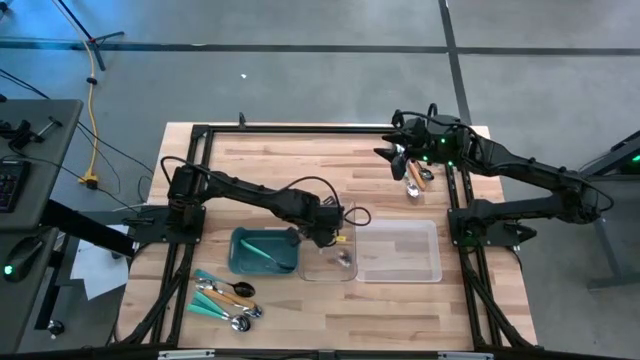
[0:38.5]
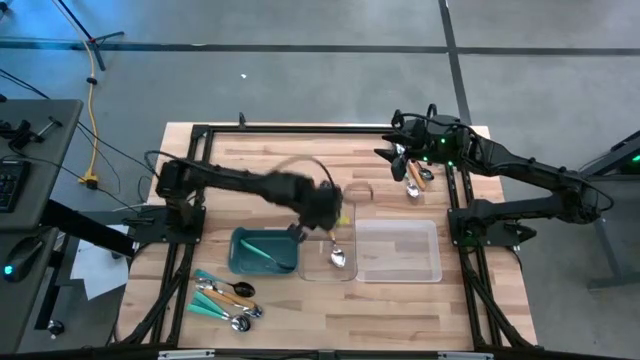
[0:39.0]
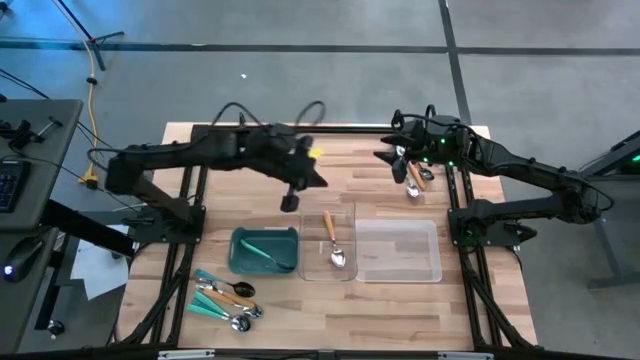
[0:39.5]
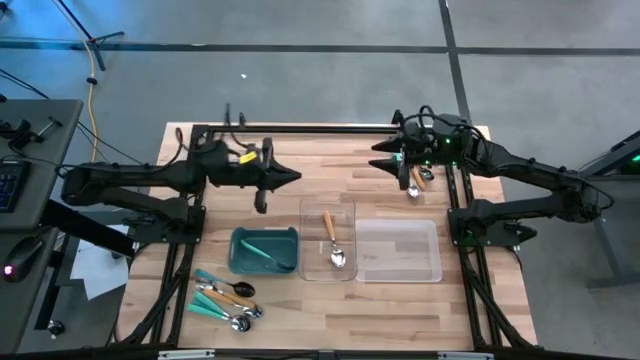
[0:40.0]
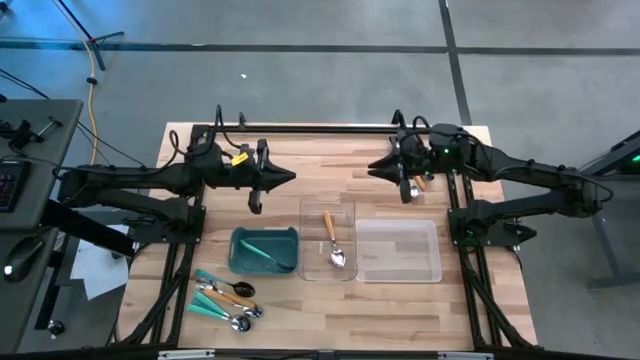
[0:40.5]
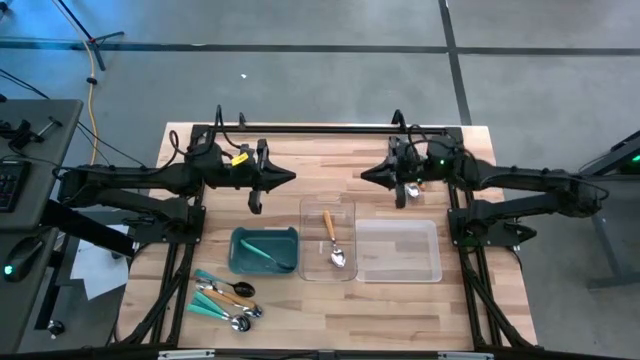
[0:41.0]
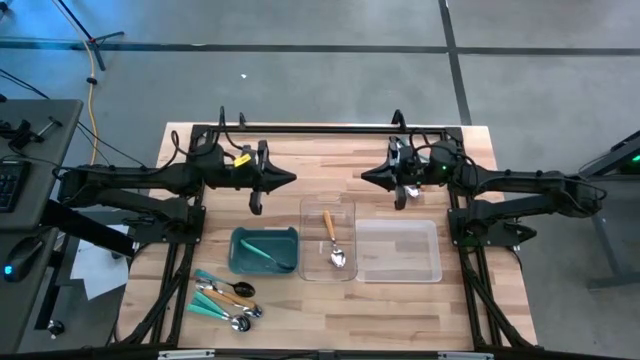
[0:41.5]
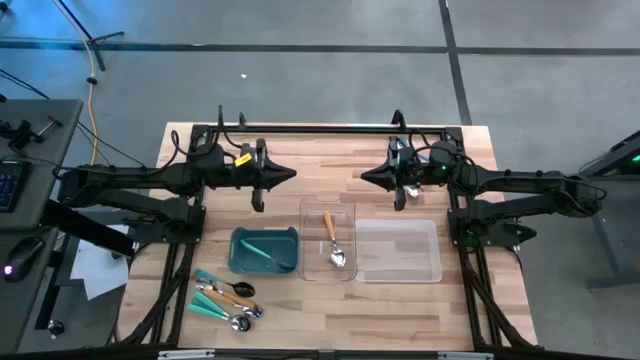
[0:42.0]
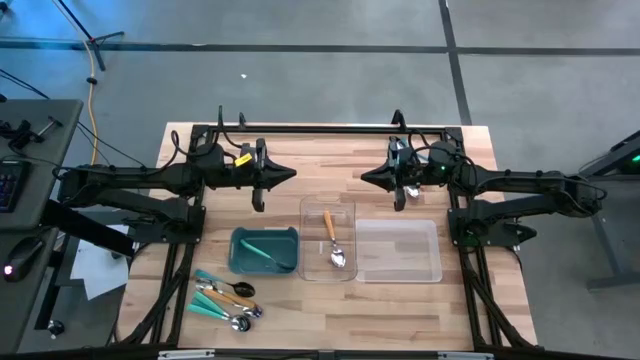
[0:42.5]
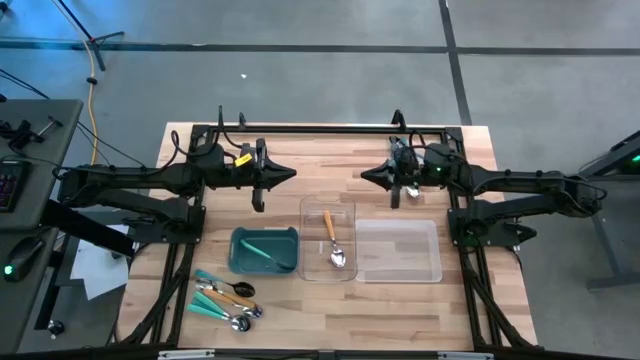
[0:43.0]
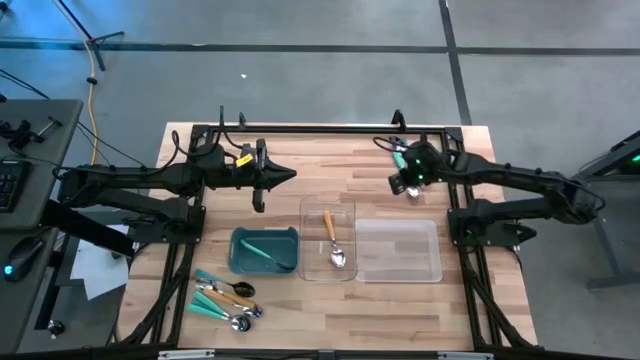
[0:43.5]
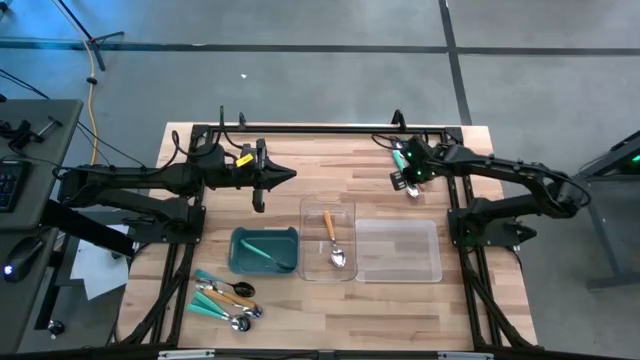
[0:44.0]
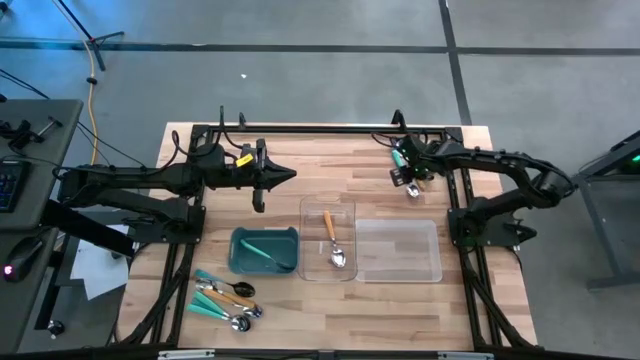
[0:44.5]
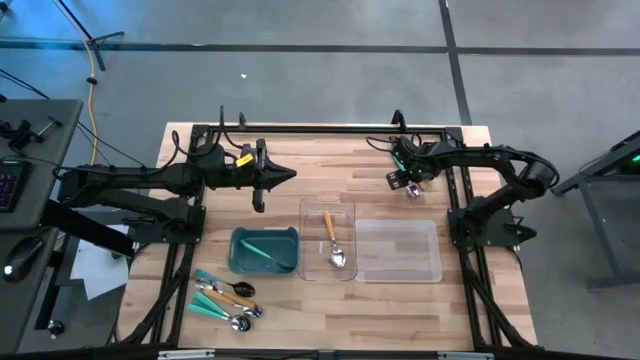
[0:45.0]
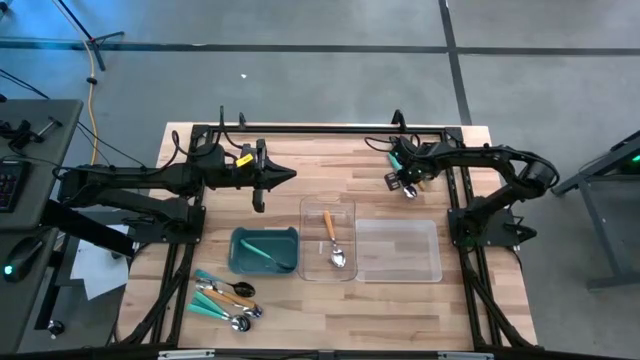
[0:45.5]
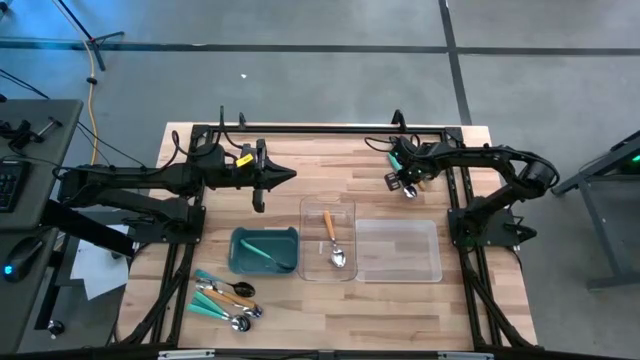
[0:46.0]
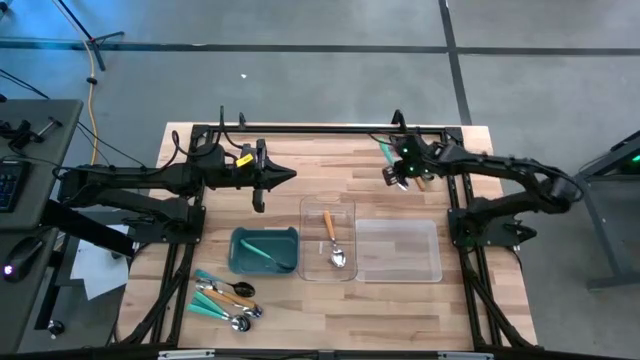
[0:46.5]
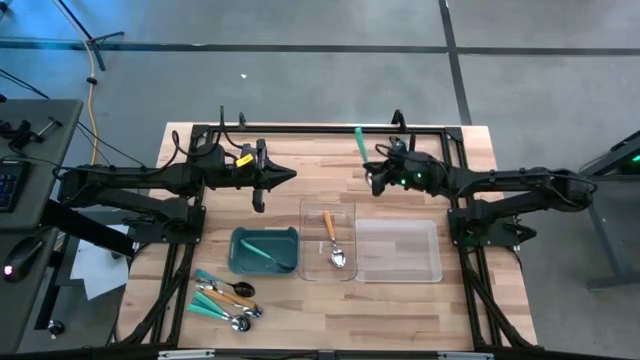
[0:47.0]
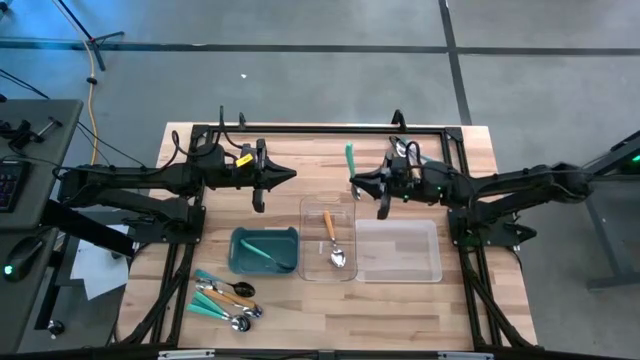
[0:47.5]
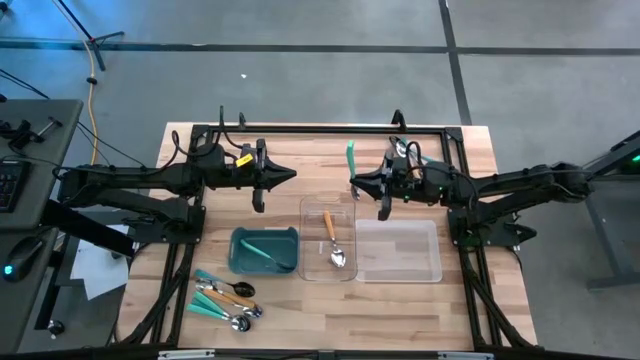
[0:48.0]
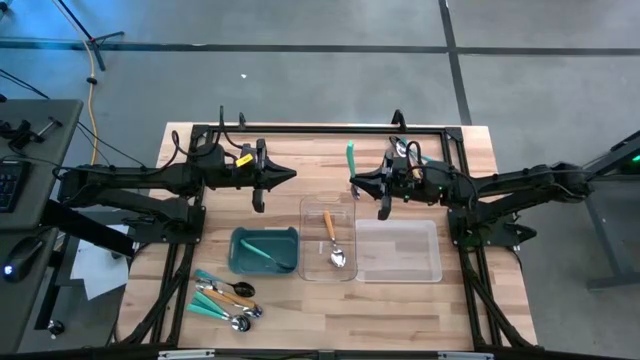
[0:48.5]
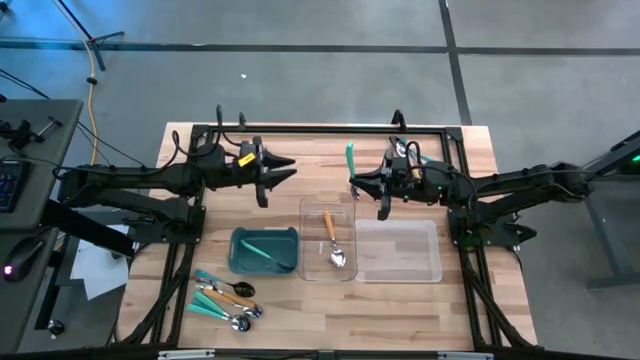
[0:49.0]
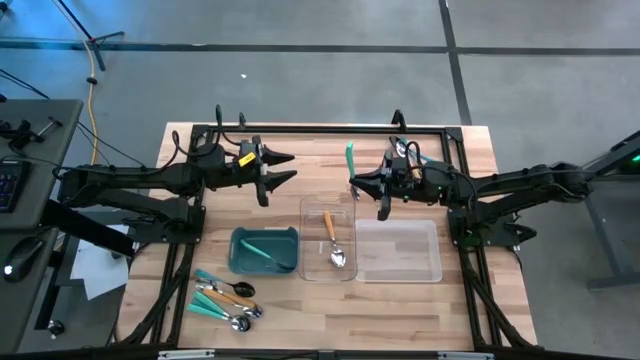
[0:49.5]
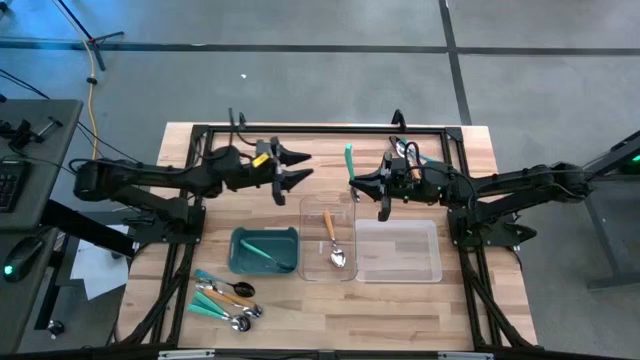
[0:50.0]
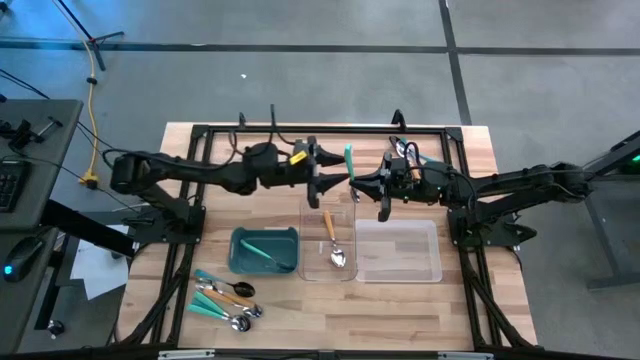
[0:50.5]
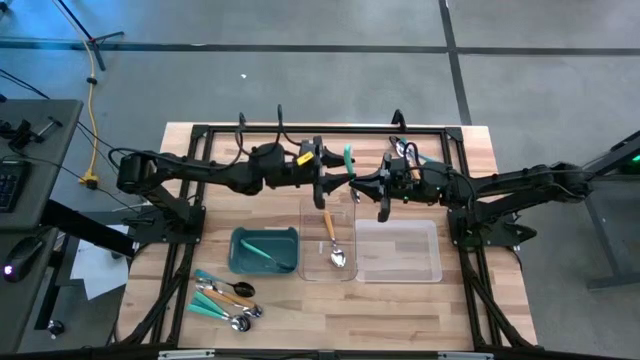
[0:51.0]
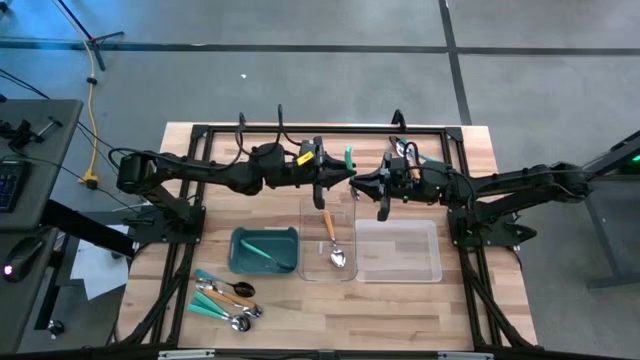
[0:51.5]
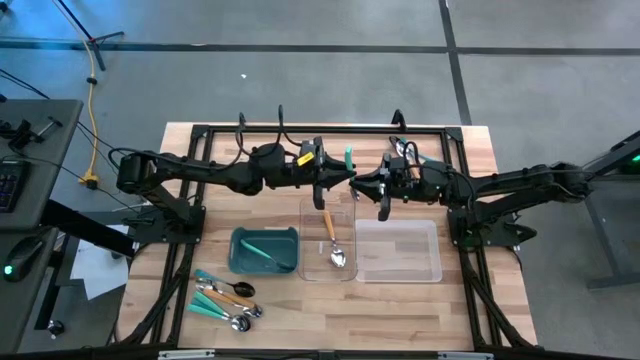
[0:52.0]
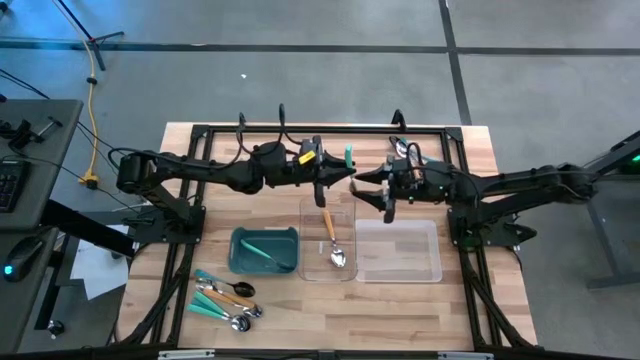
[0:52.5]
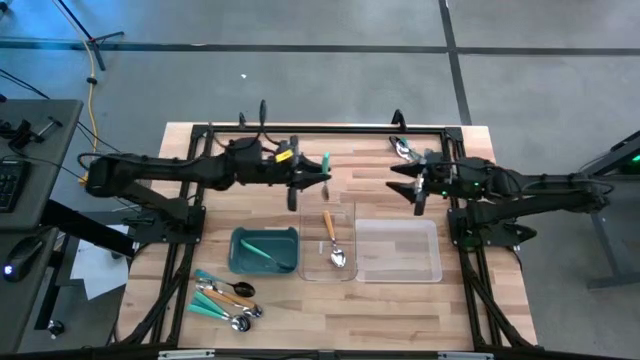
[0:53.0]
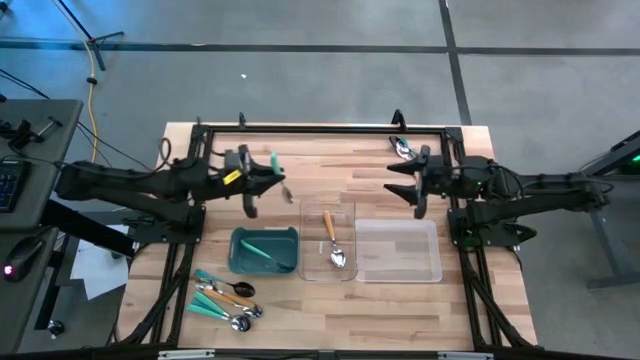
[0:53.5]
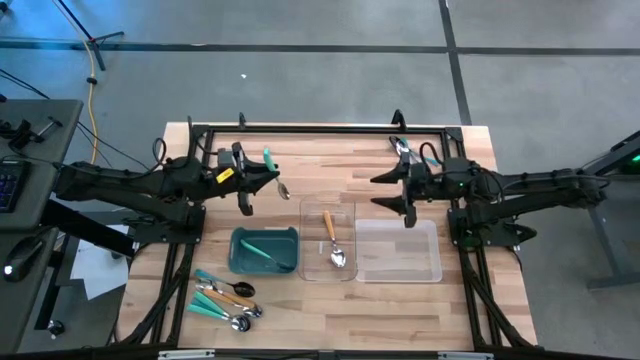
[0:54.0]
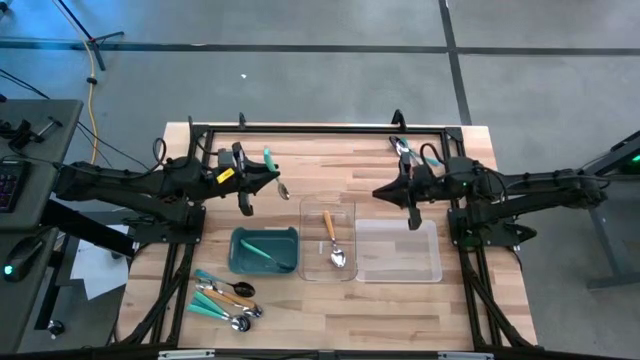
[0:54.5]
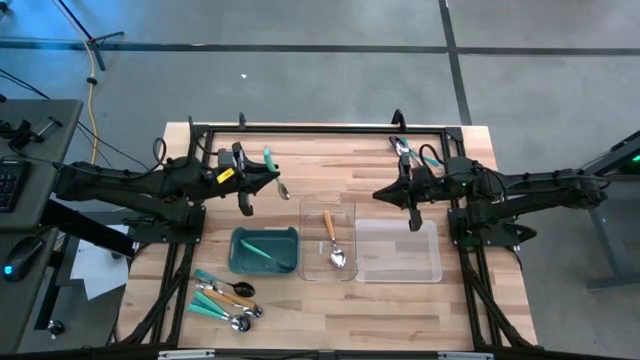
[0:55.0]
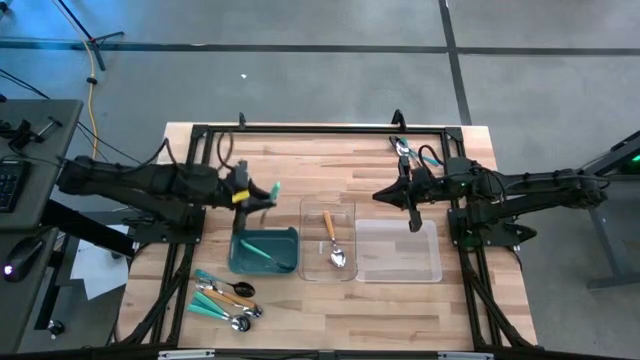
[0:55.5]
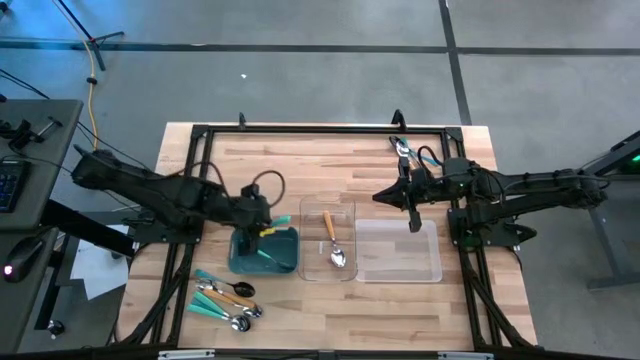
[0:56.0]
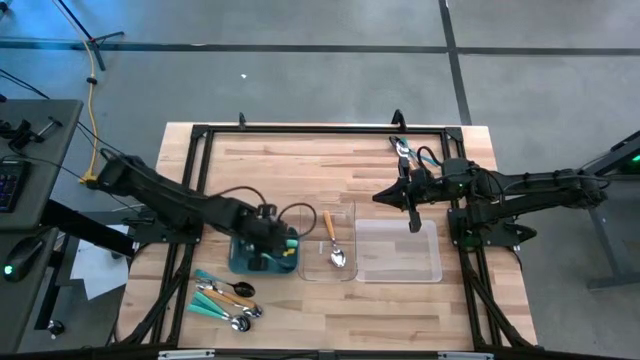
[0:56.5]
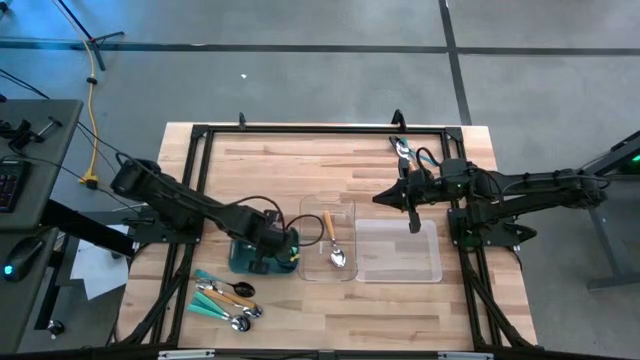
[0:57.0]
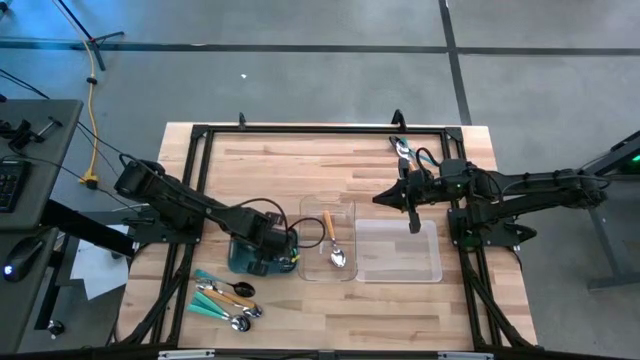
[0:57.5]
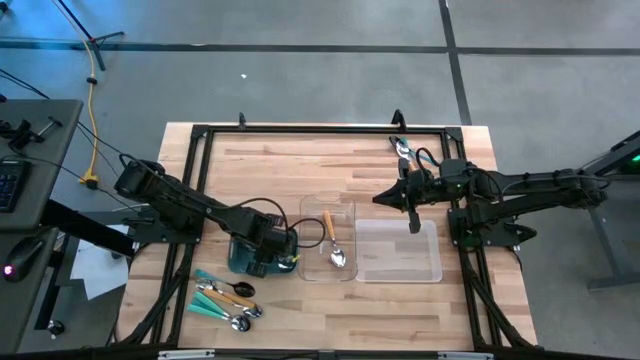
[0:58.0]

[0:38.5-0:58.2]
Task: Sort silverware by color (type)
Put the light blue spoon into the blue bin
